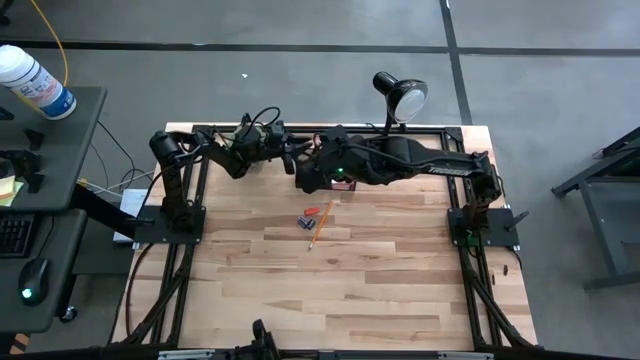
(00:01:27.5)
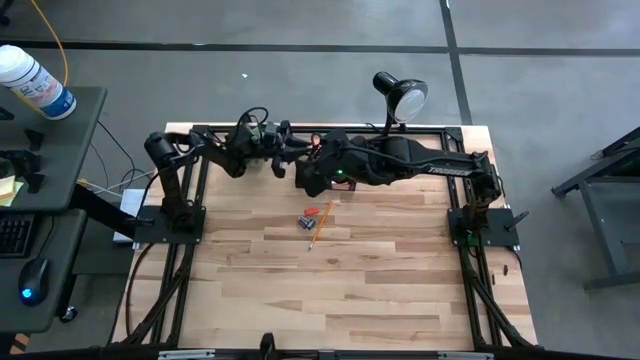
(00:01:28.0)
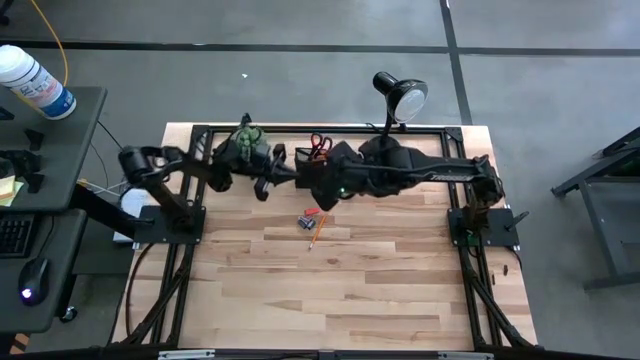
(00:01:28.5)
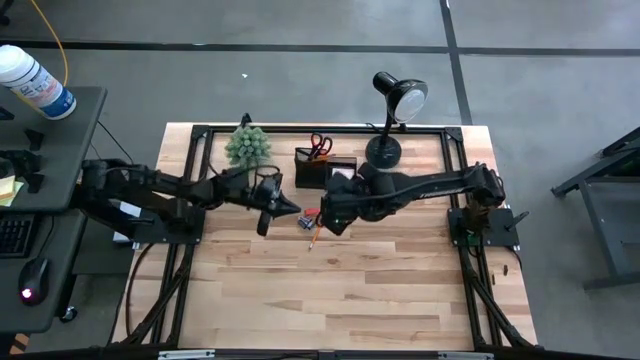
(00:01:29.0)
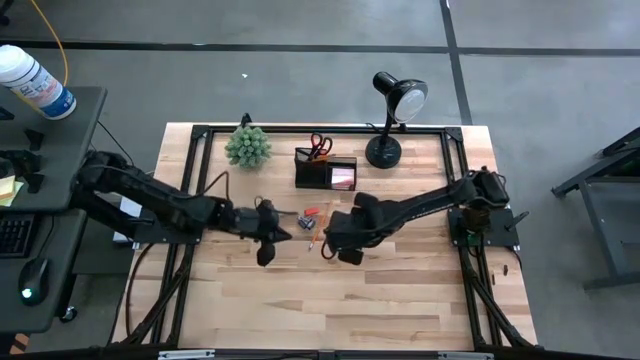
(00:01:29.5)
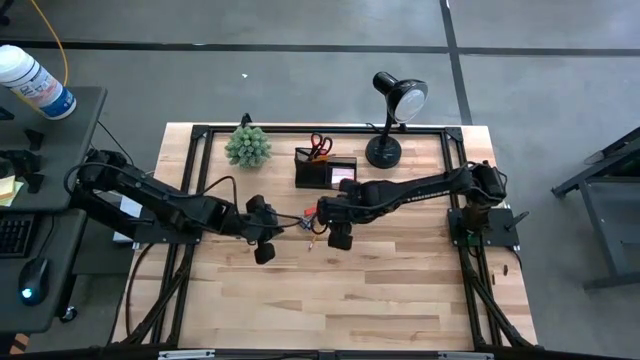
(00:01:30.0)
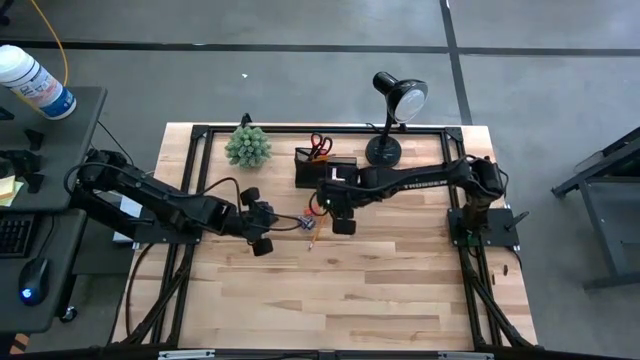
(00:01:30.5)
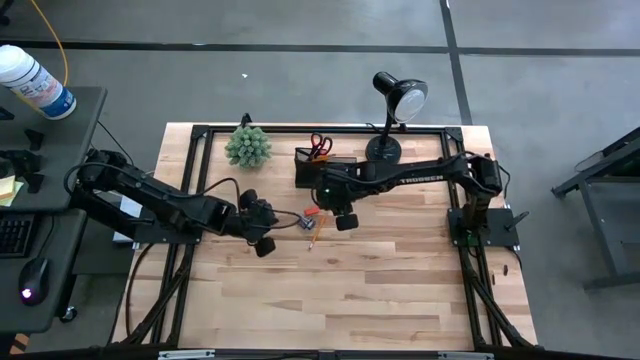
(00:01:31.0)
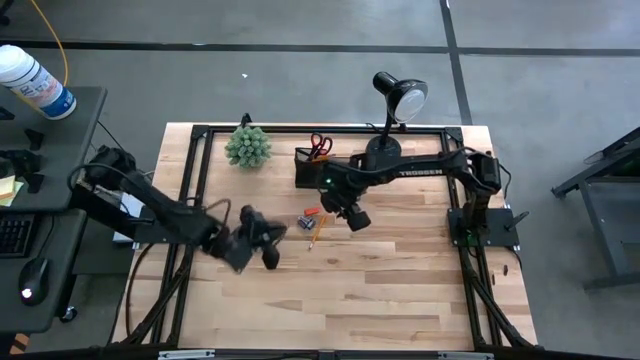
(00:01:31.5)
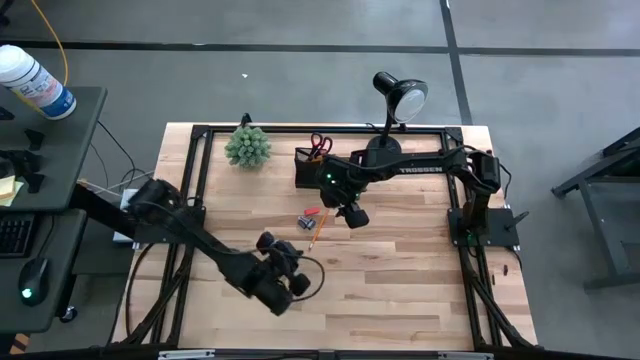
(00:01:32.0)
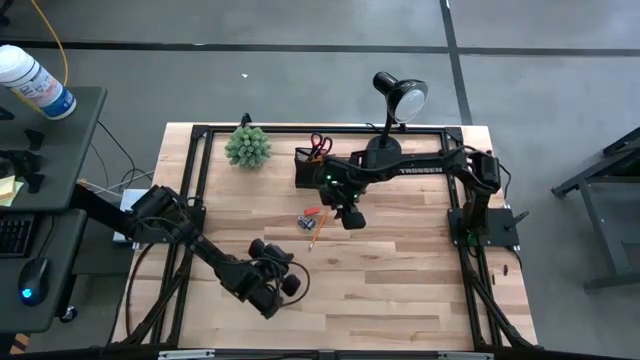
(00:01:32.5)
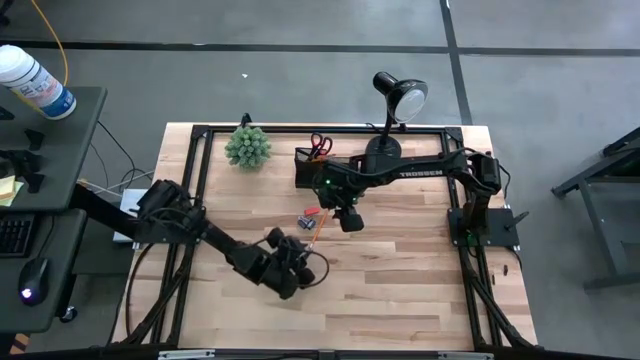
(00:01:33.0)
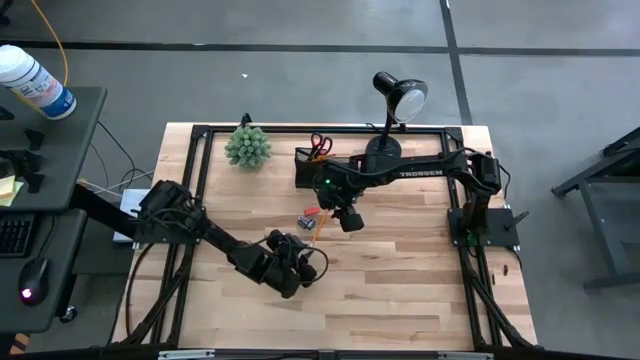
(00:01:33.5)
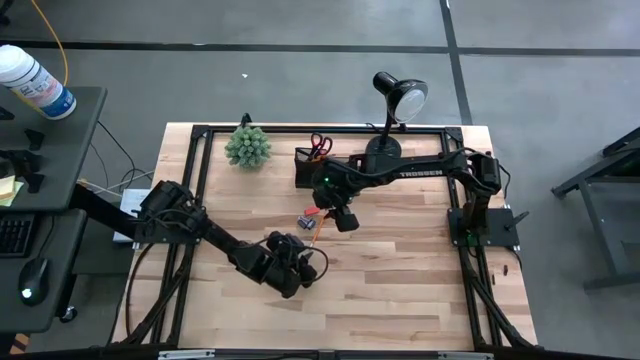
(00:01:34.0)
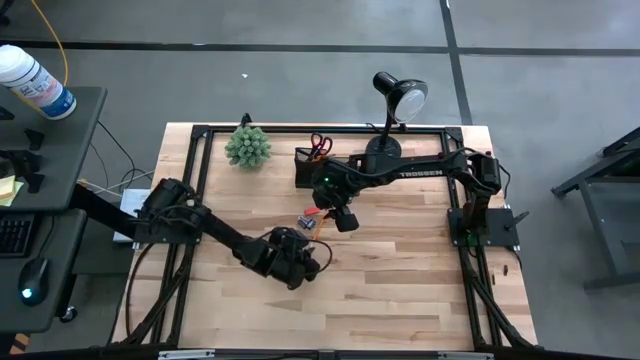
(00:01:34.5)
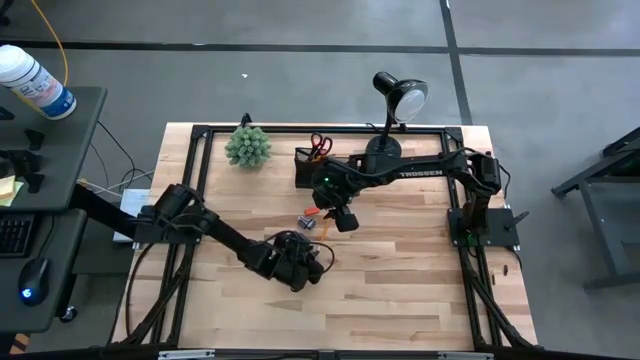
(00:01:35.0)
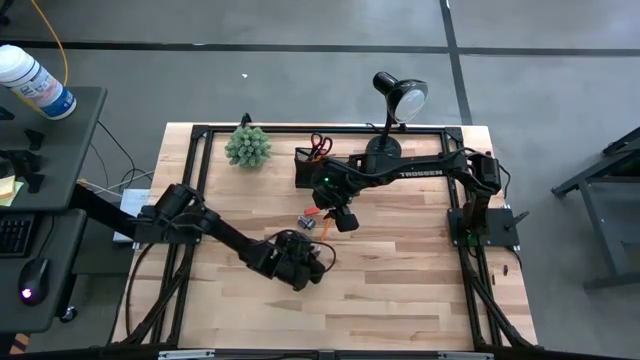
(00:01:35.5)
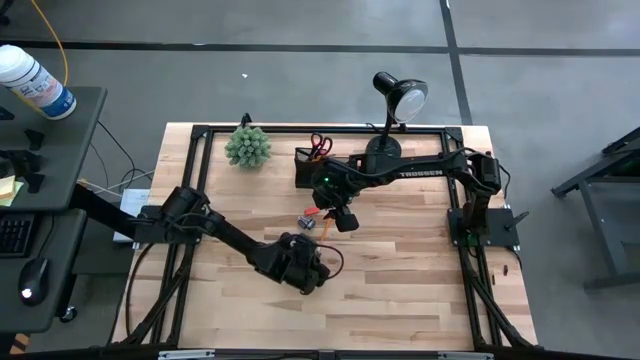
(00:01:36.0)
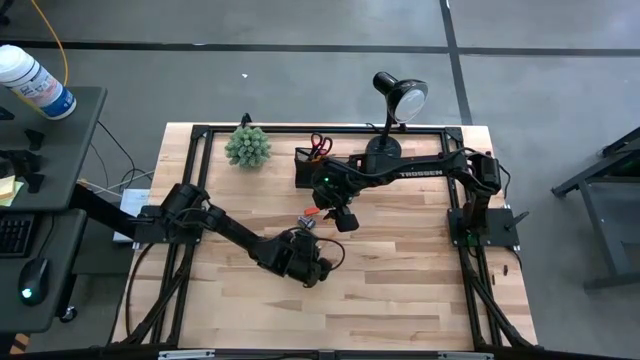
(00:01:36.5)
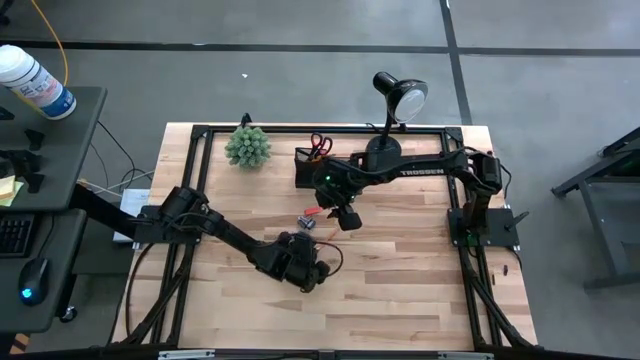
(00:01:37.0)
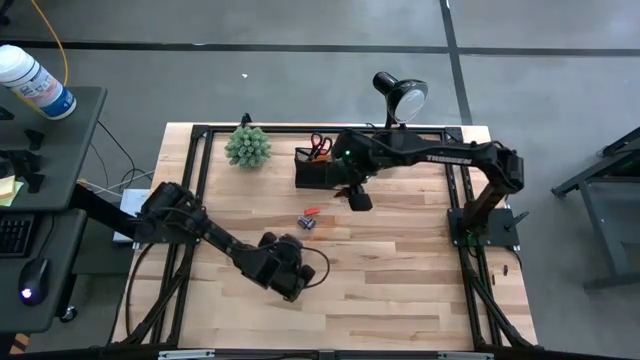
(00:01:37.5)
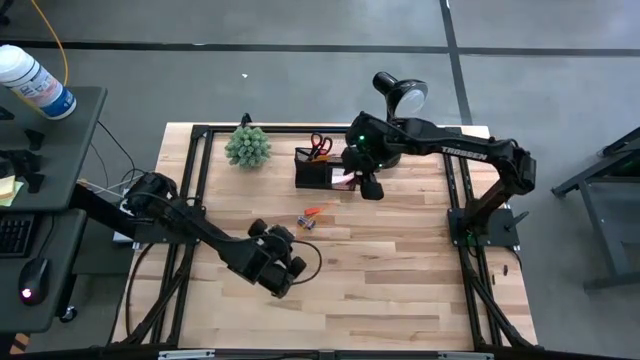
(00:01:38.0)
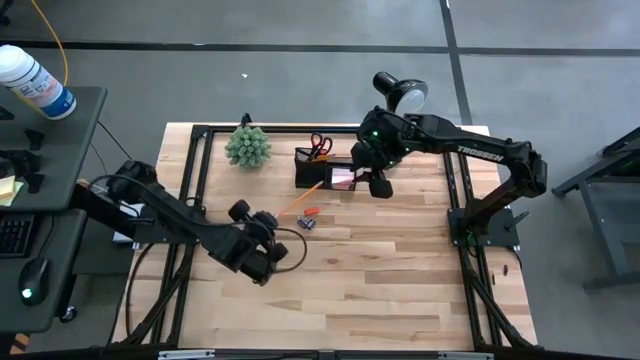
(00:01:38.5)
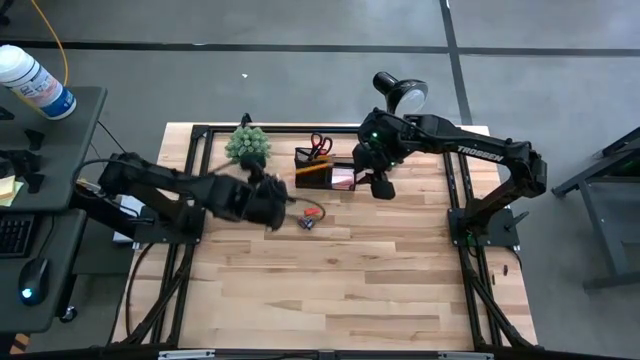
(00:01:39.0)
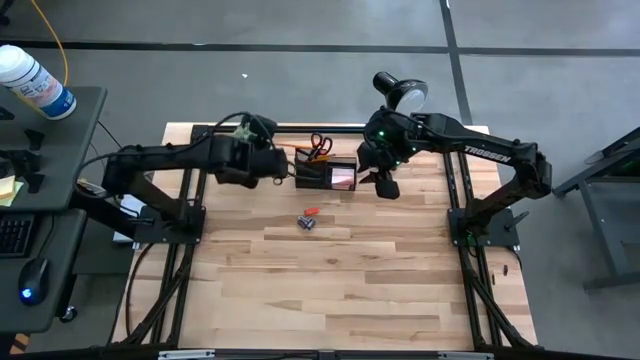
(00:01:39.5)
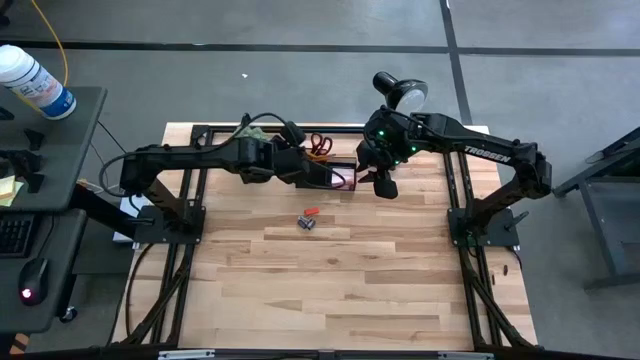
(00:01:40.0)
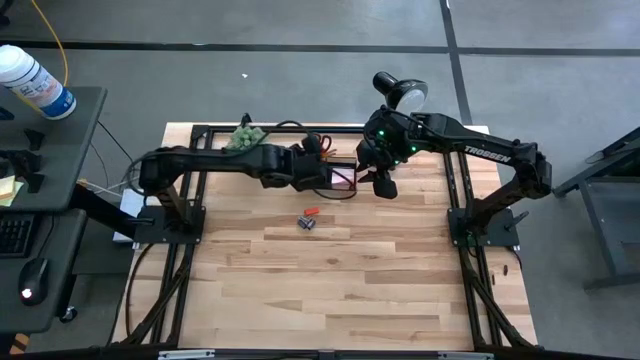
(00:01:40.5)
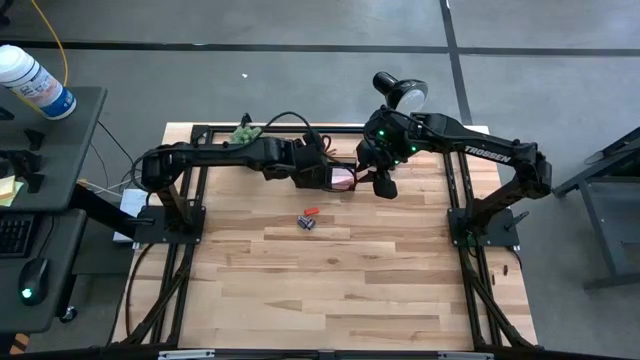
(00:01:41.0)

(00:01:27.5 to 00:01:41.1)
Task: Pick and place office supplies into organizer
Put the yellow pencil into the desk organizer

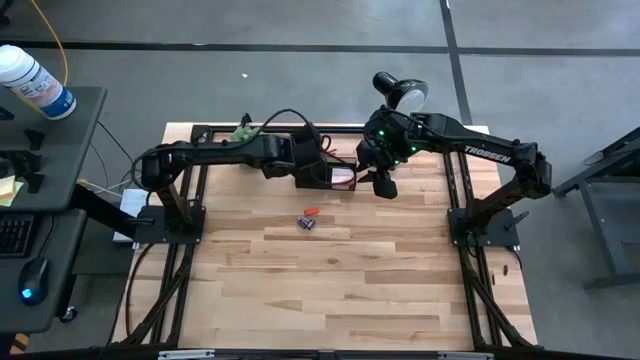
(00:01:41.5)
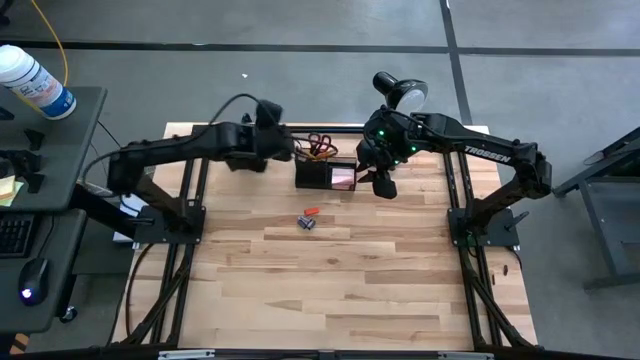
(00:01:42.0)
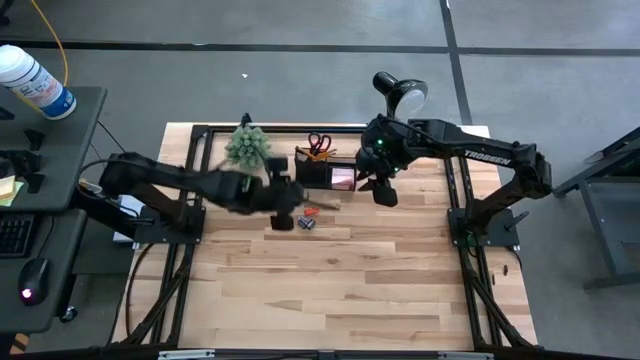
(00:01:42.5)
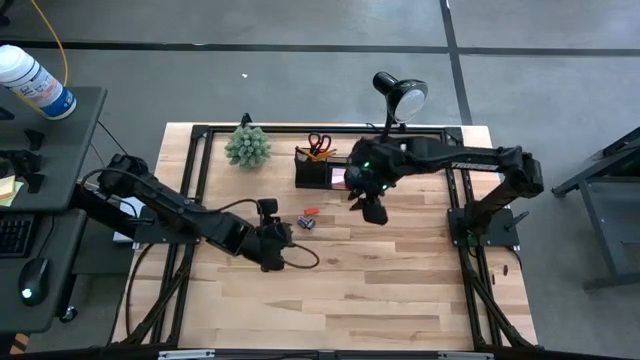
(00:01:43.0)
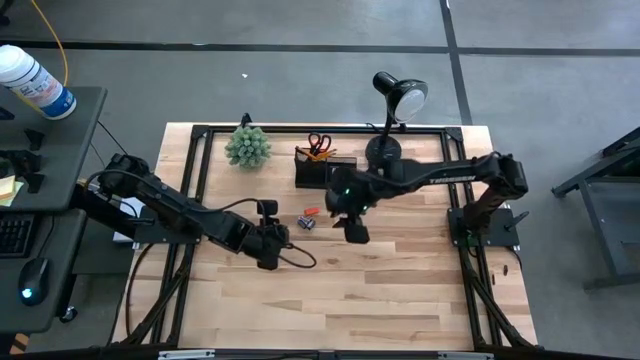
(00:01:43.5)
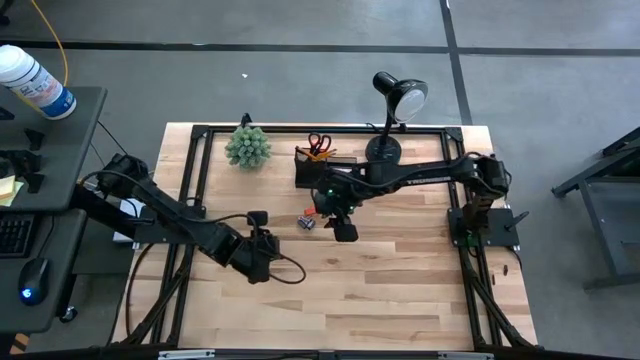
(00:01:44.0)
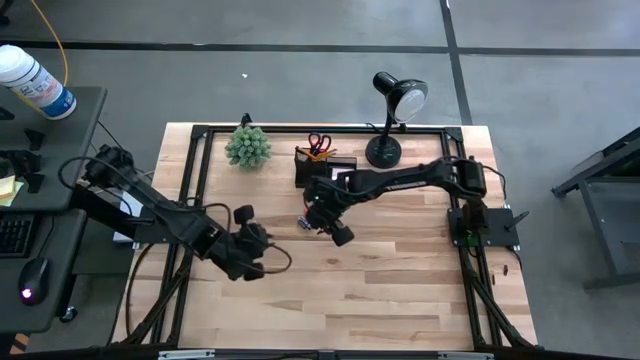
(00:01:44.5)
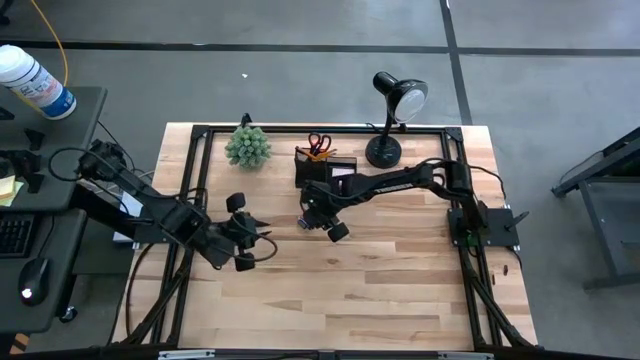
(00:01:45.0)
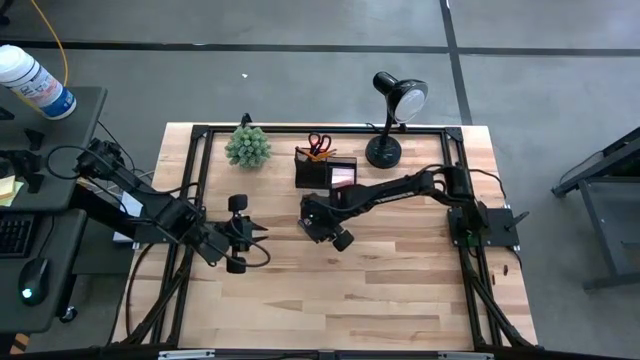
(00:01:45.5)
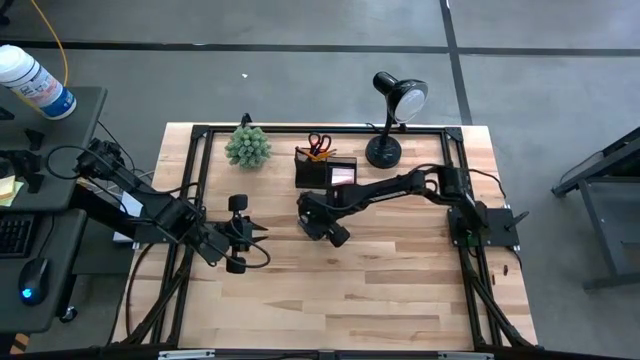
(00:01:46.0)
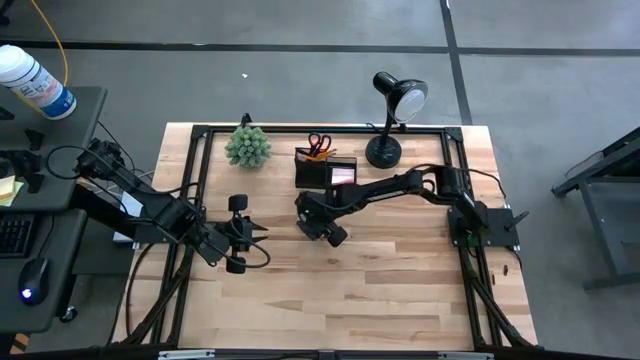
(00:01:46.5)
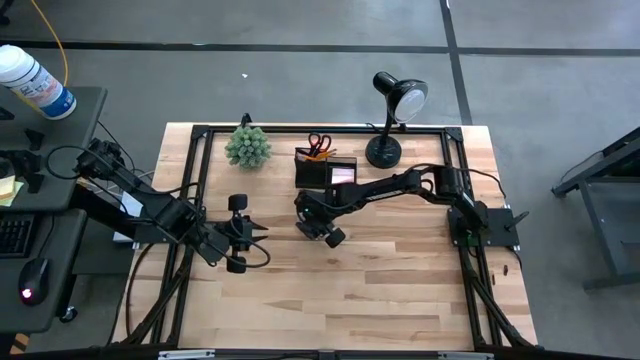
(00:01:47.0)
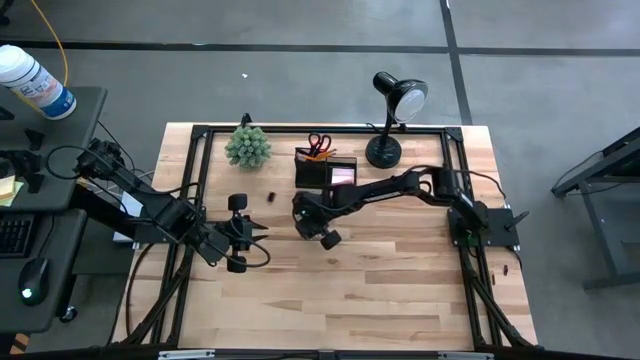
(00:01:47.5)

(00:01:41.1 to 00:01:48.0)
Put the right binder clip into the desk organizer
